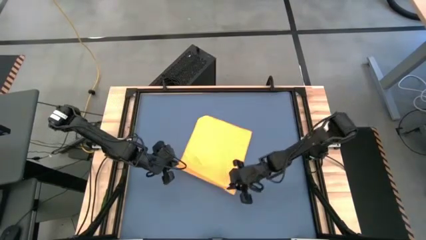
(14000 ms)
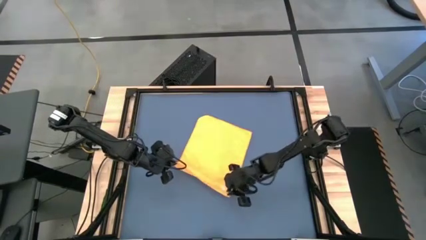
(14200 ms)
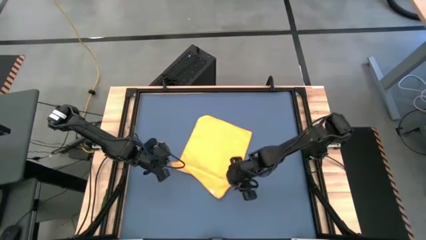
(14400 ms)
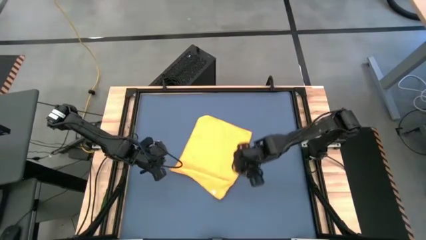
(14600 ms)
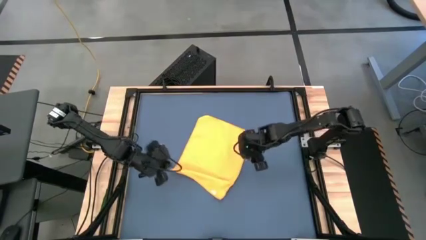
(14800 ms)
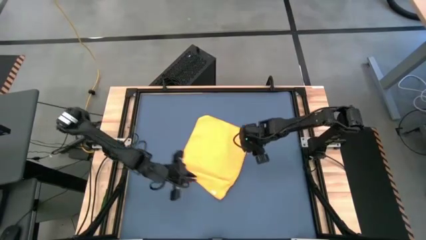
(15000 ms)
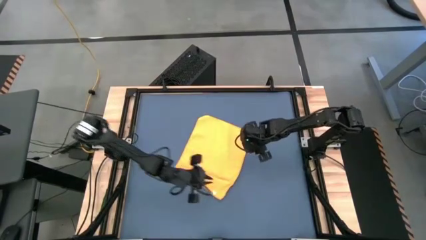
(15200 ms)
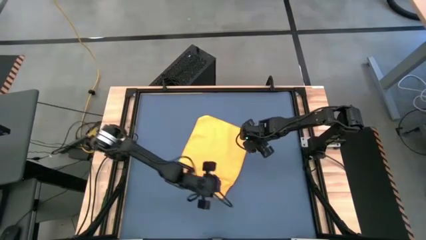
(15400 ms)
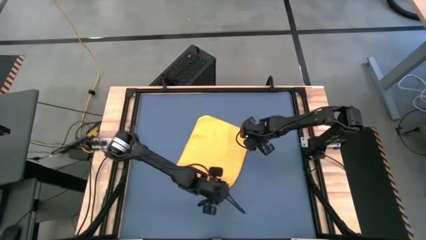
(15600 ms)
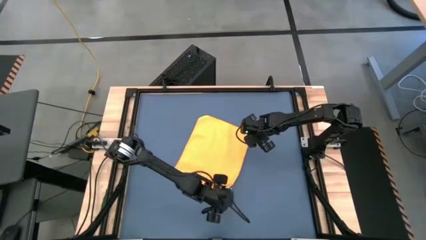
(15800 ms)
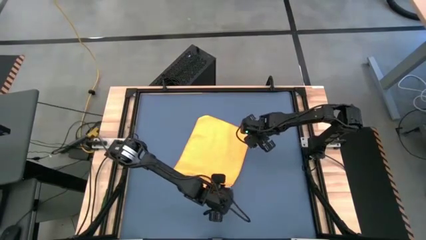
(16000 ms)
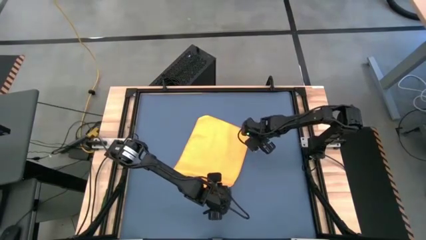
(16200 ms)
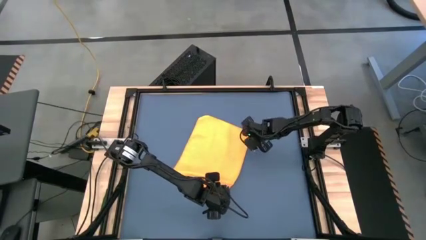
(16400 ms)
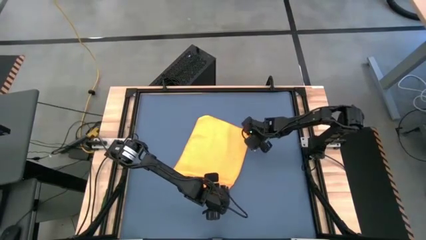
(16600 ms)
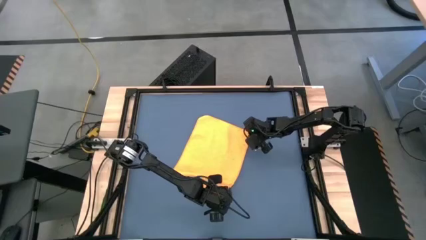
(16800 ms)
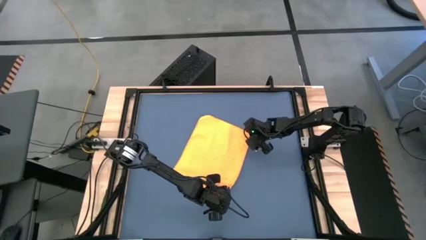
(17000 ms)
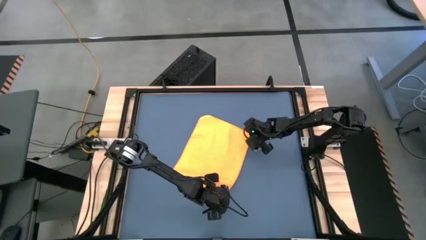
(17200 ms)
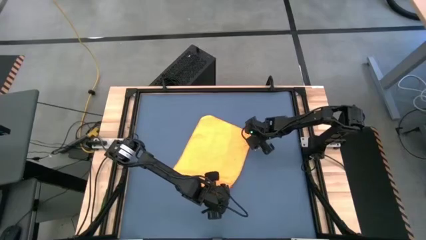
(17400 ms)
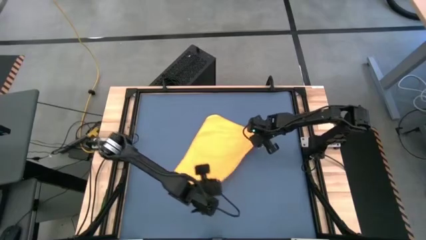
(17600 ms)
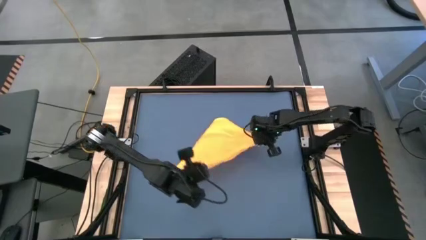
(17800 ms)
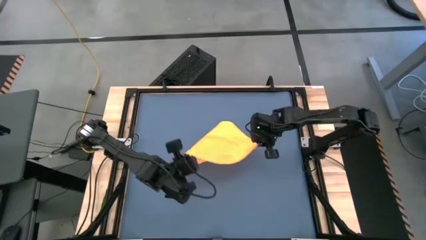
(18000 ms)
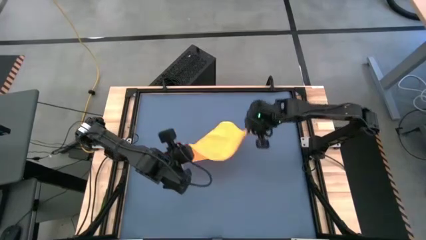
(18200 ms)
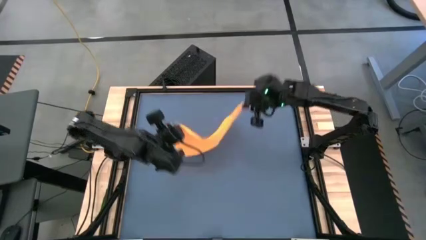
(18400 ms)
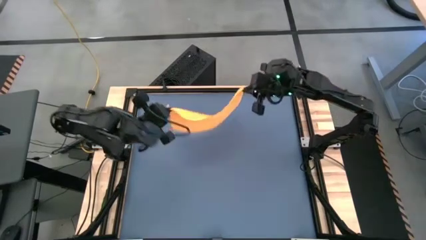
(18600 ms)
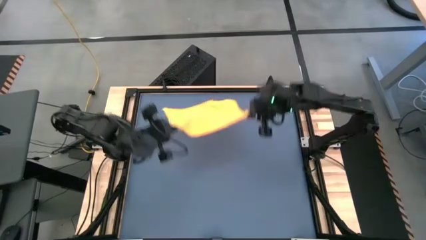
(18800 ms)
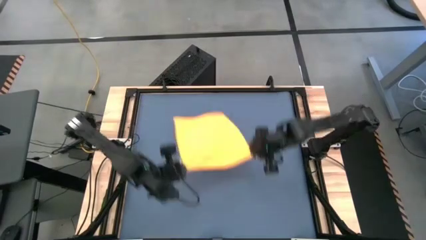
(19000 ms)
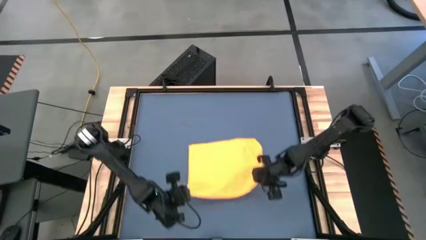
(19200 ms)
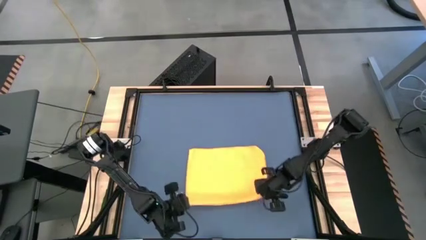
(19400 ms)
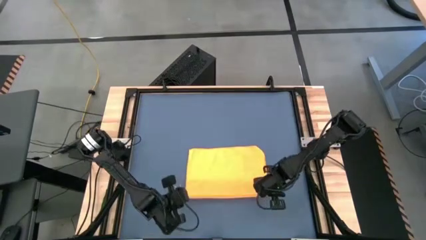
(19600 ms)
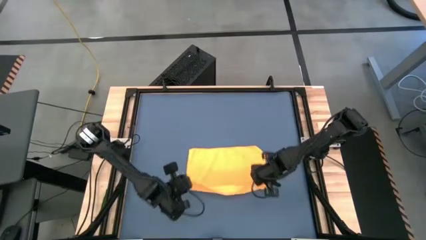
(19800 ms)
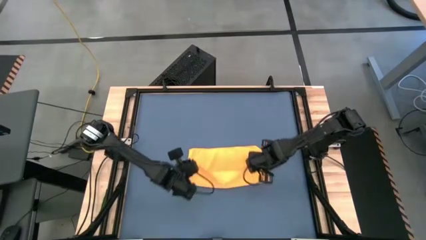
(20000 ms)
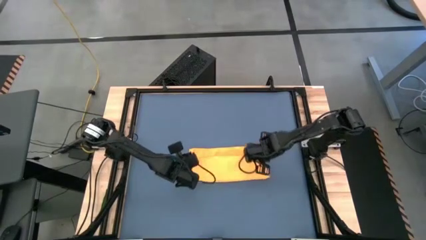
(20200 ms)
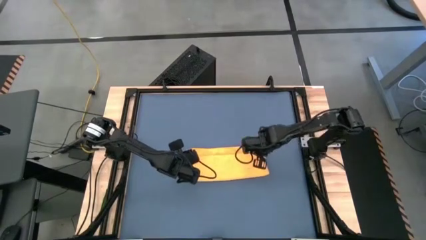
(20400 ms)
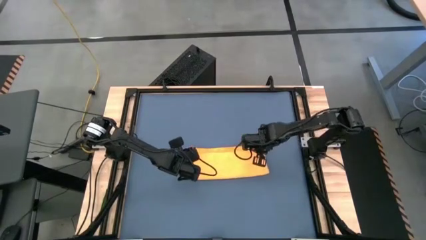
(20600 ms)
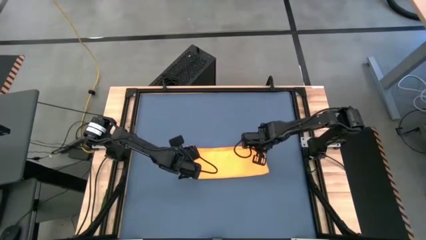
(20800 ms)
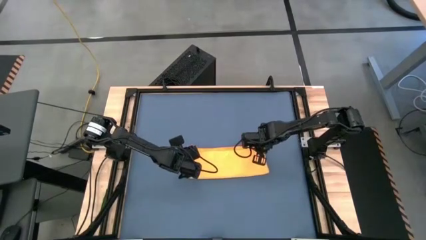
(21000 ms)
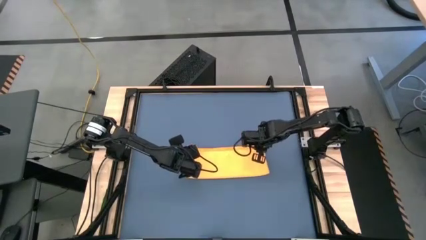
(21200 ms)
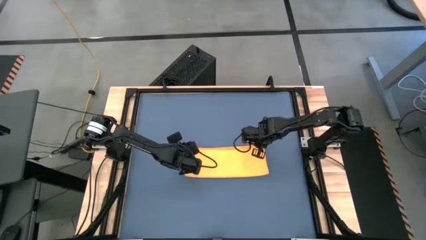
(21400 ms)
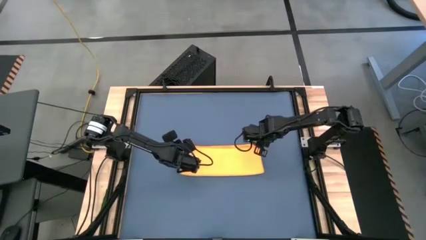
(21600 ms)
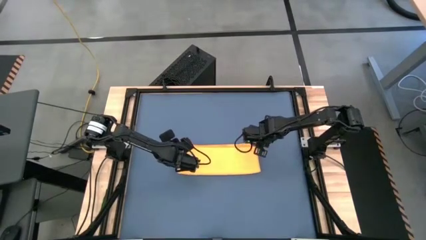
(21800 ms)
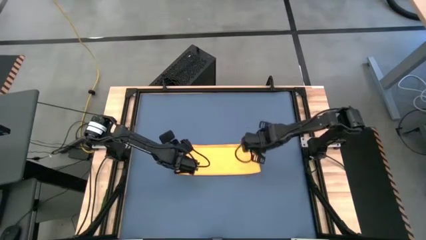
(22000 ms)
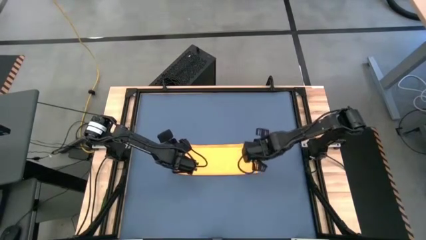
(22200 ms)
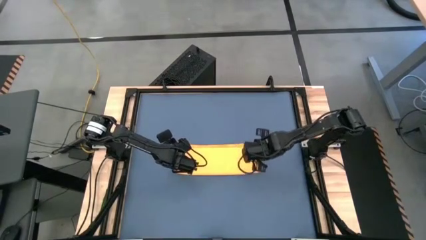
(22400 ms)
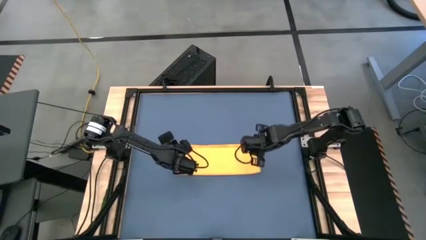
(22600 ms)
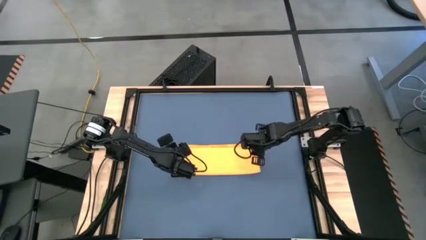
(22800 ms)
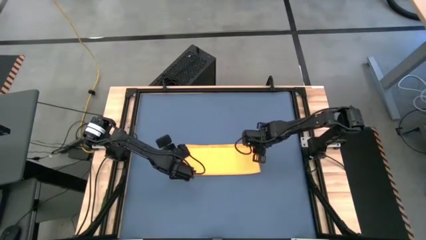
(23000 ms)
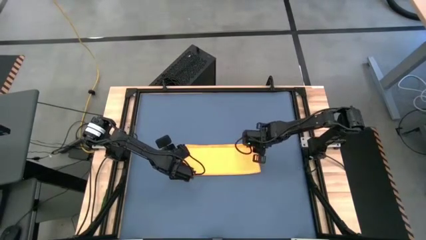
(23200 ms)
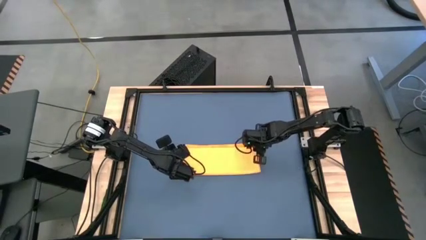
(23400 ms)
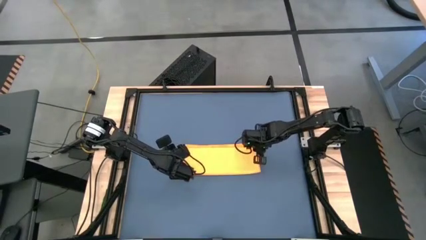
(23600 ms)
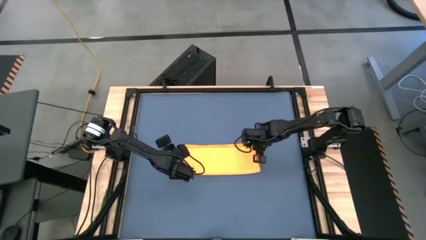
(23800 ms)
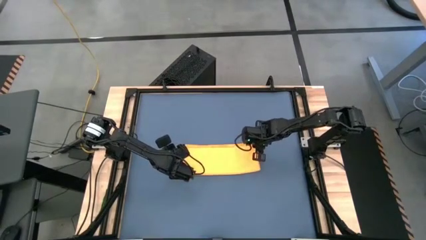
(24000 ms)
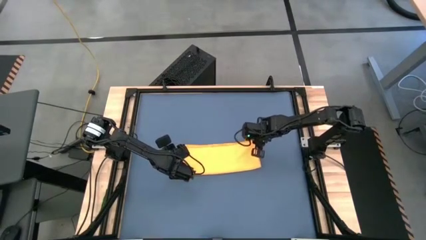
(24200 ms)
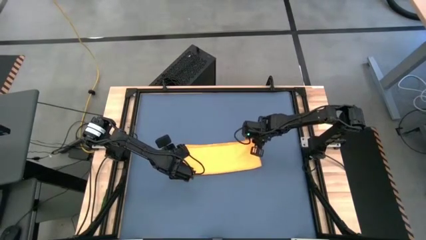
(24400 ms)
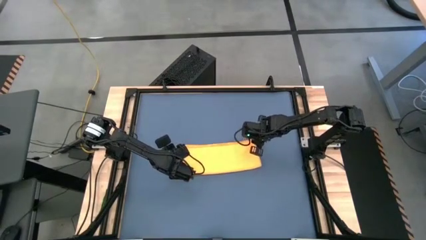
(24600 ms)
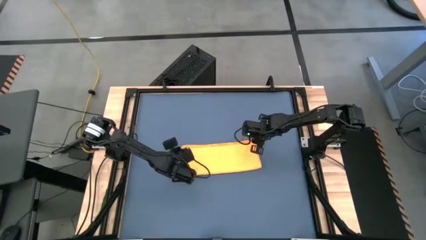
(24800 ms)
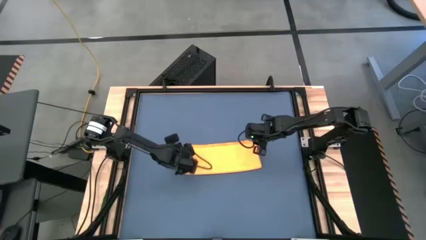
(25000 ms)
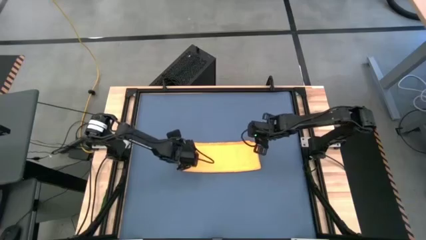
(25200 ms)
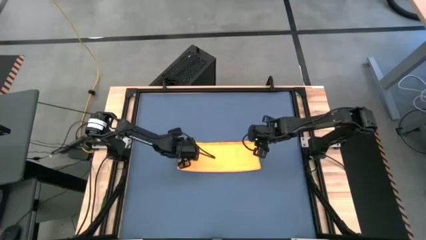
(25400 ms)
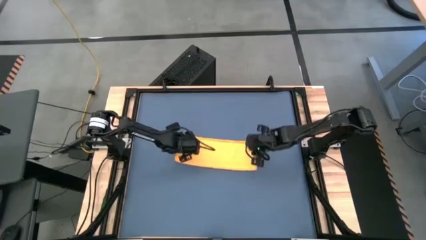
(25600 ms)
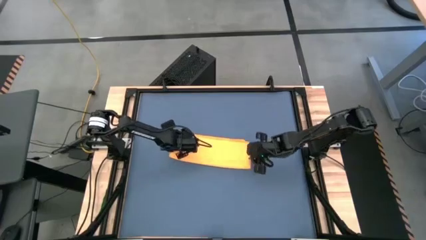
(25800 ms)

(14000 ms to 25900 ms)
Task: Roll towel
Fold the orange microfiber cloth

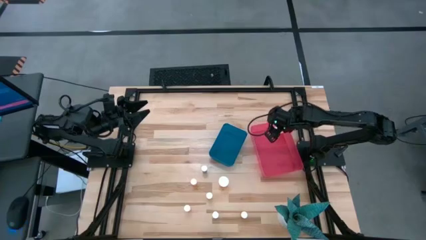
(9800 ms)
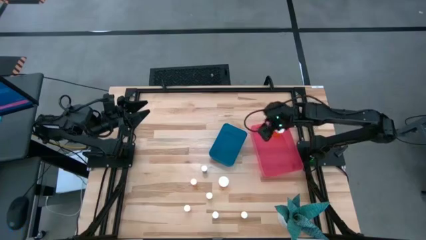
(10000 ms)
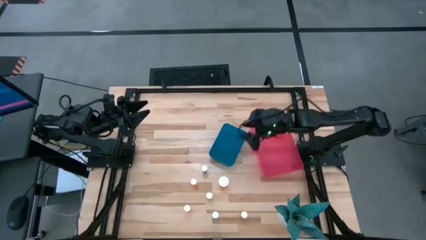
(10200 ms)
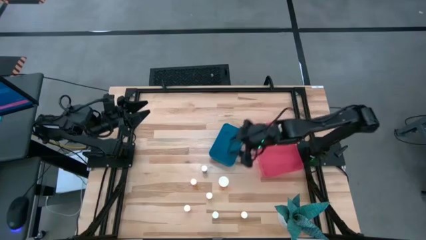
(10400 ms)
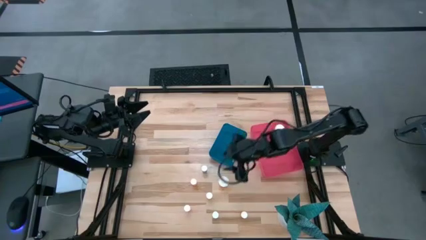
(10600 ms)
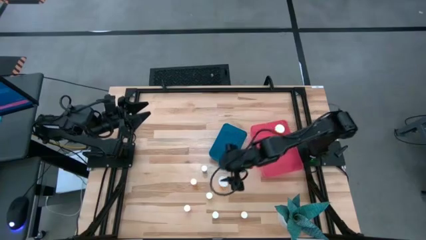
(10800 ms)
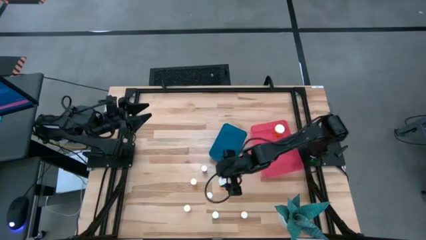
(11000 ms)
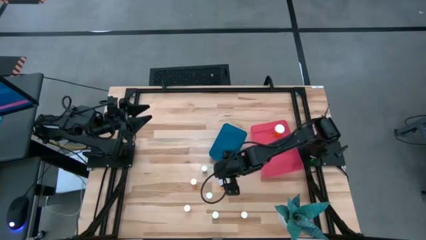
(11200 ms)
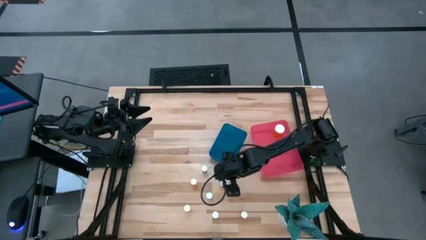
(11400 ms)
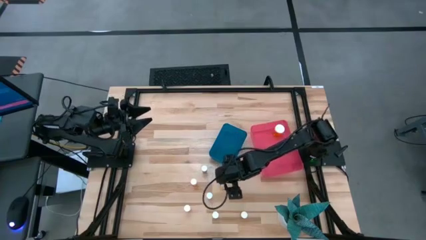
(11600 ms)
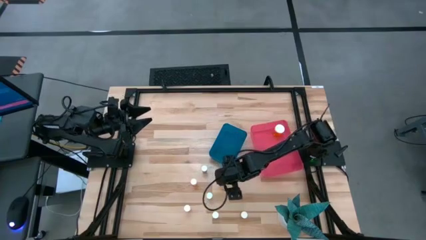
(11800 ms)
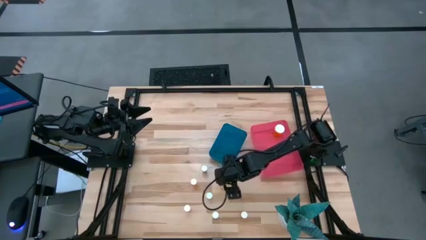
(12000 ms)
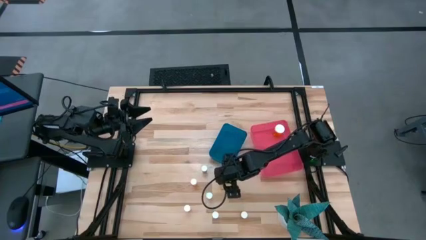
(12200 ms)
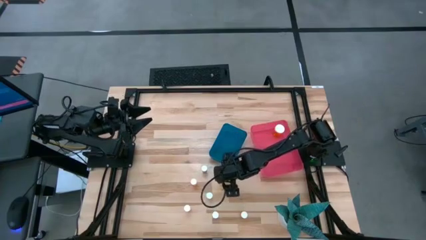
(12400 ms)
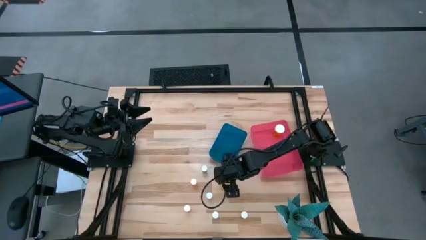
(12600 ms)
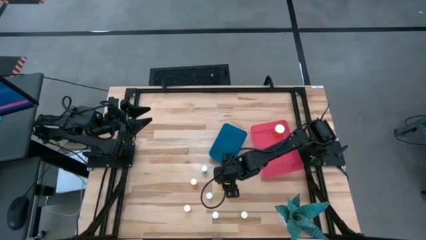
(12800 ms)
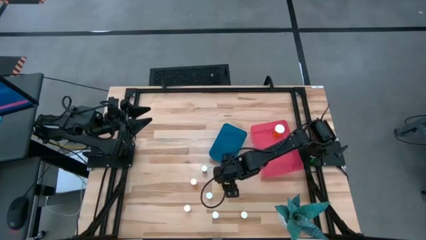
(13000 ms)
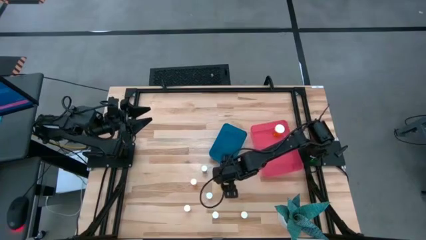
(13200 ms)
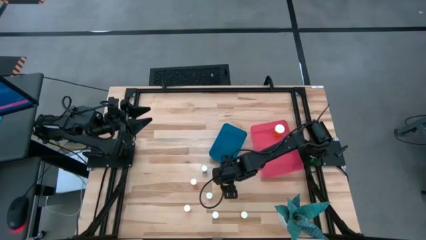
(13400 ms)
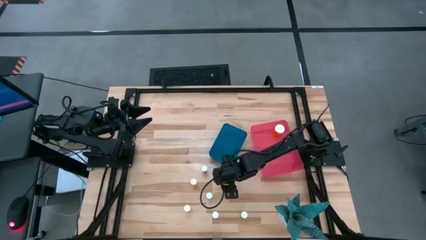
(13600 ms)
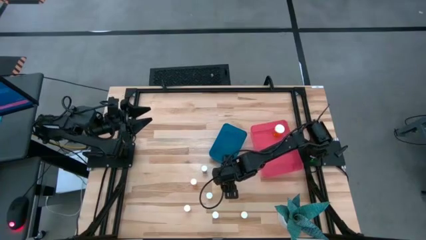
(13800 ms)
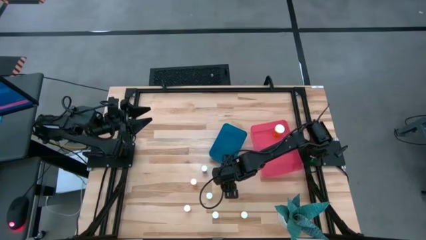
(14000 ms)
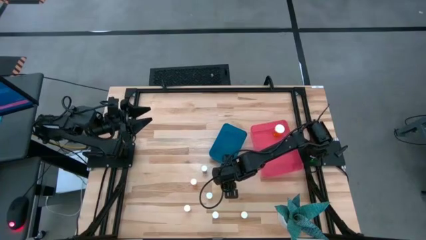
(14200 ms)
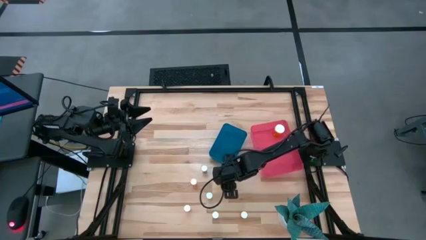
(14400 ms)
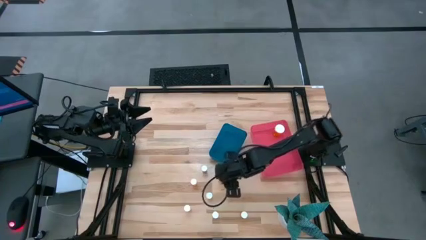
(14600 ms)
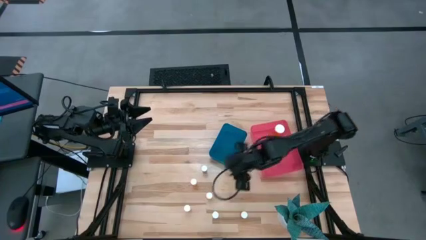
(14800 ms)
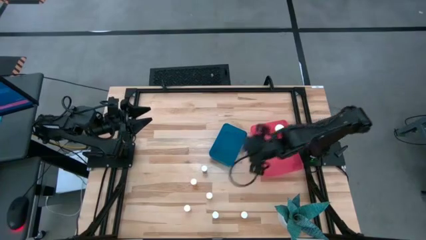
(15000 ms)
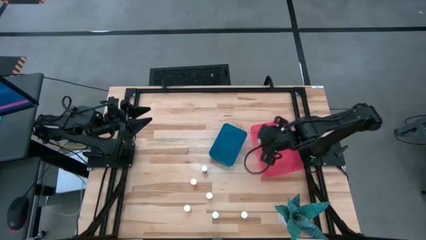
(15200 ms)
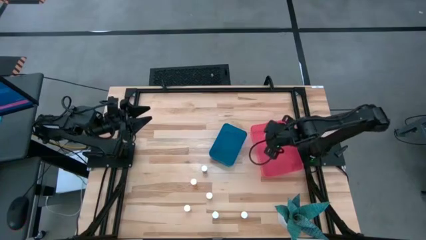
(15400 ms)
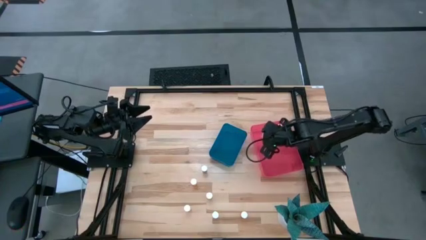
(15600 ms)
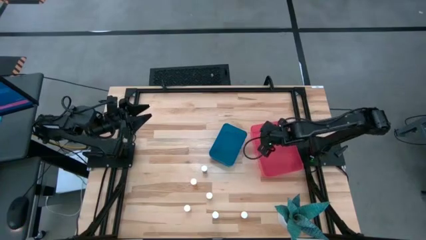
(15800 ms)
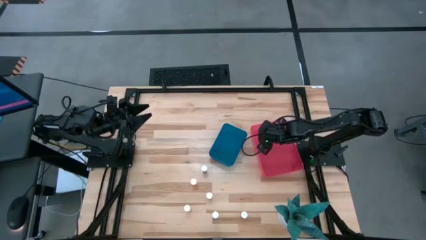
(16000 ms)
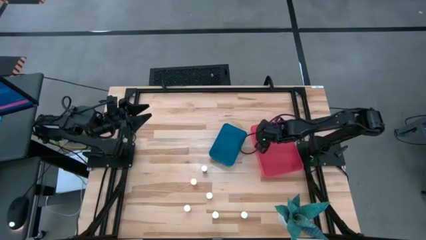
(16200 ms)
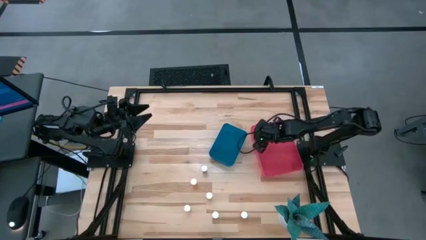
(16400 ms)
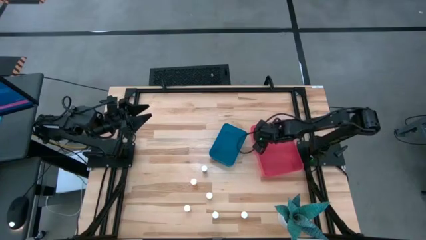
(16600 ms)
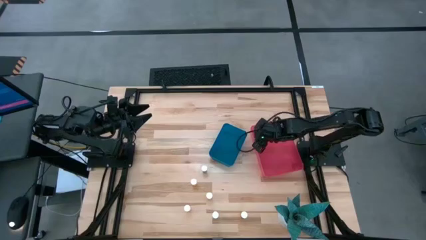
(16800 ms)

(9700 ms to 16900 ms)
Task: Pick and place medicine bottles into bin by pill shape (circle, oval)
Put the top orange capsule bottle into the pink bin
